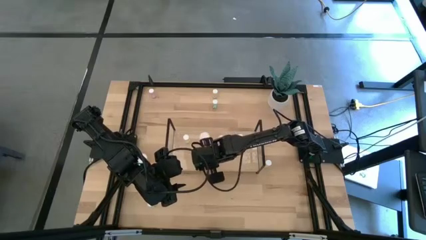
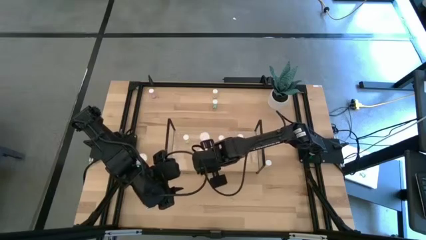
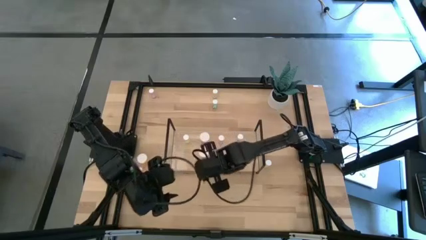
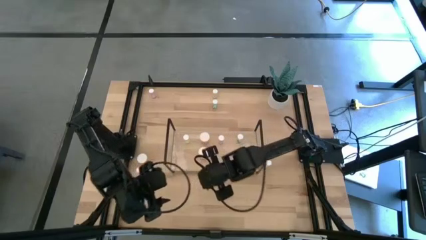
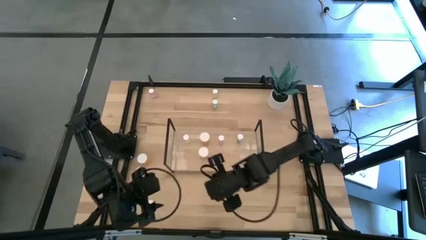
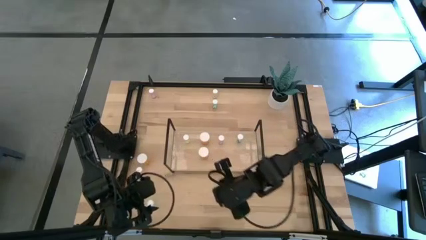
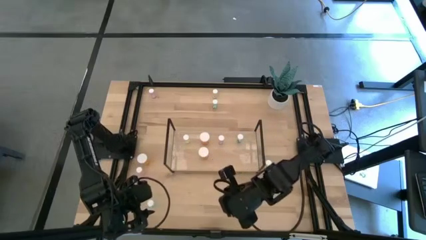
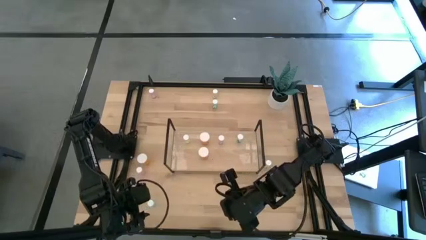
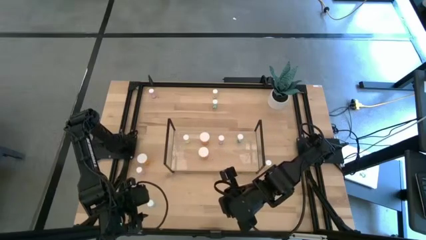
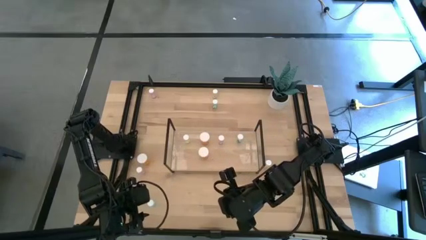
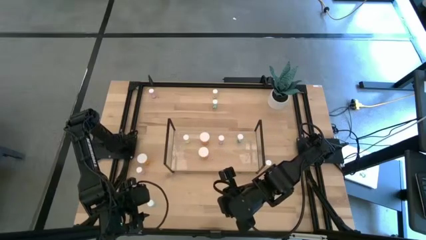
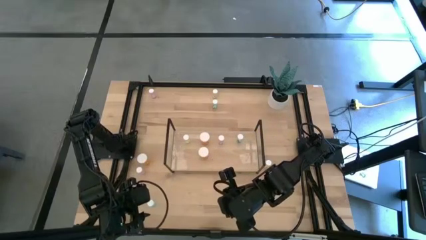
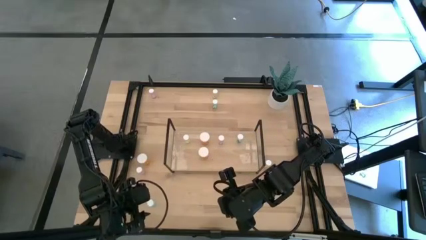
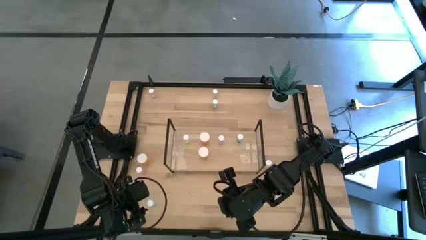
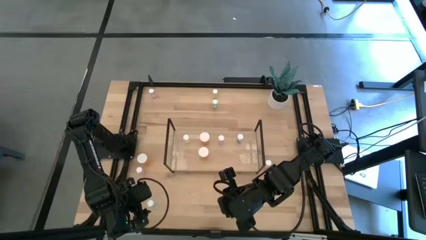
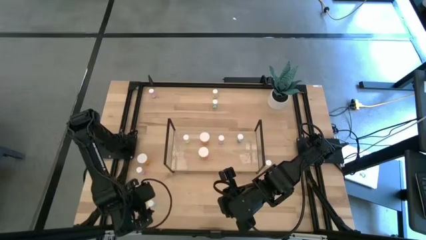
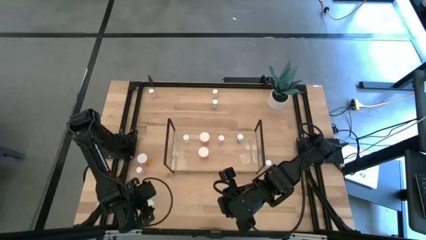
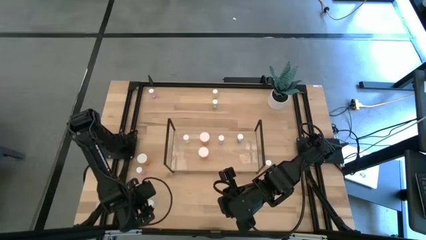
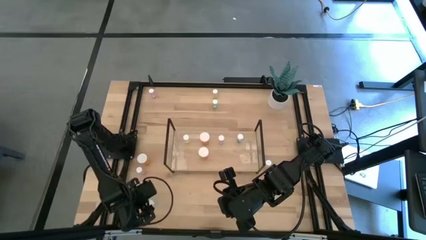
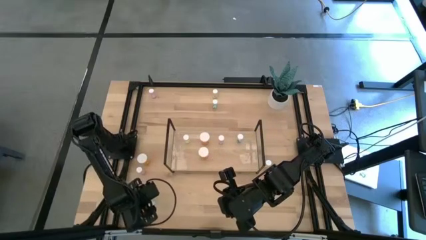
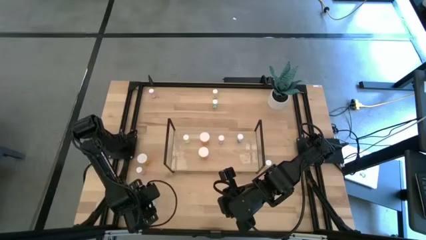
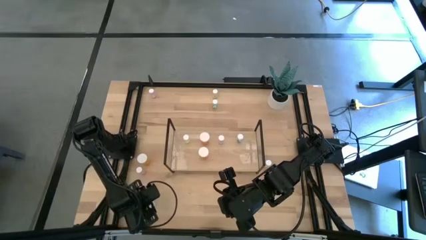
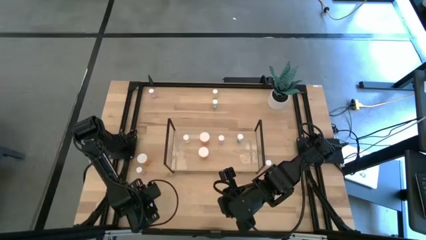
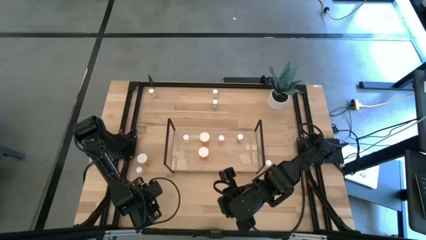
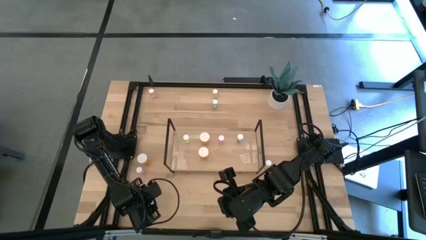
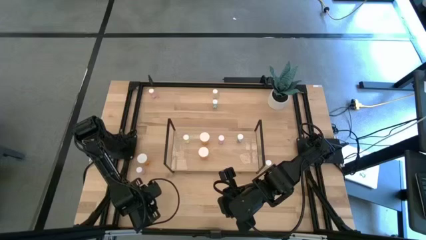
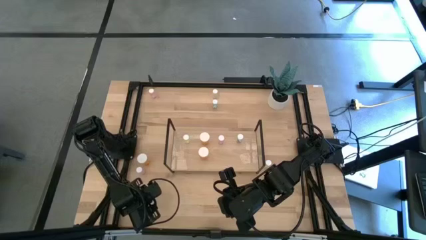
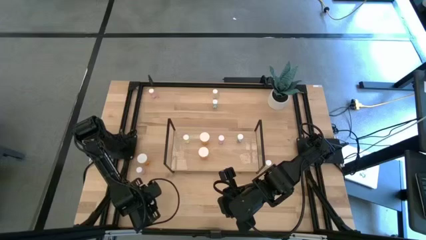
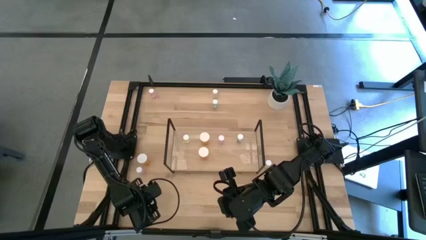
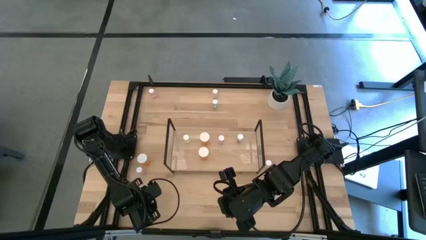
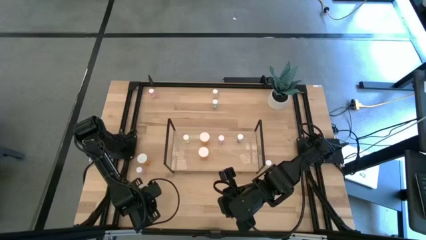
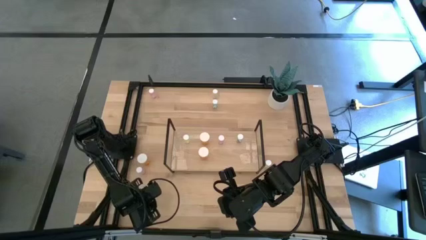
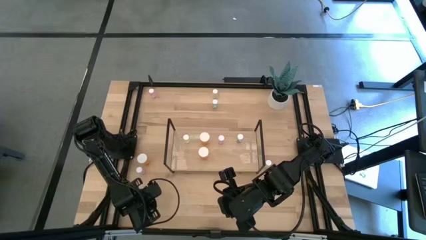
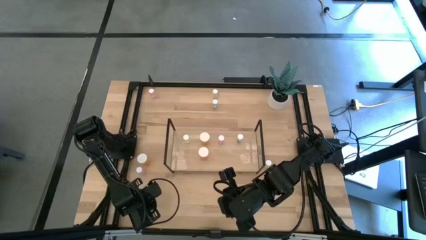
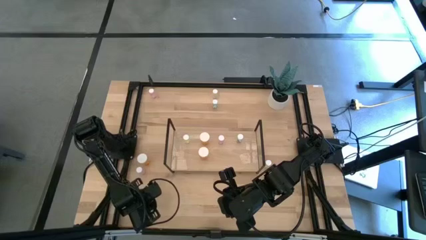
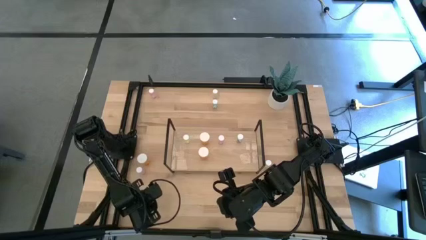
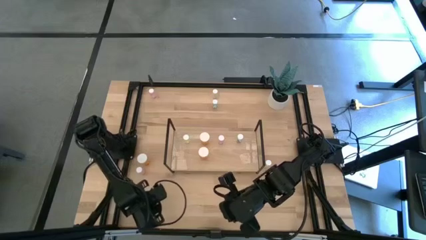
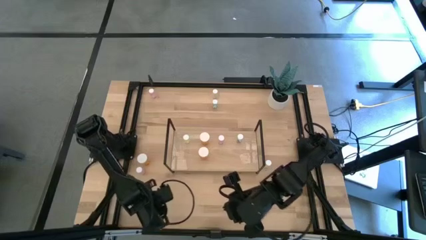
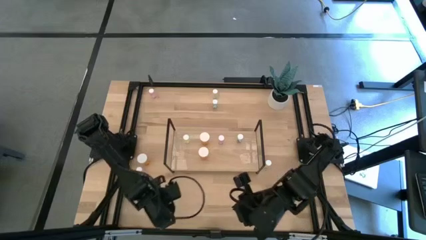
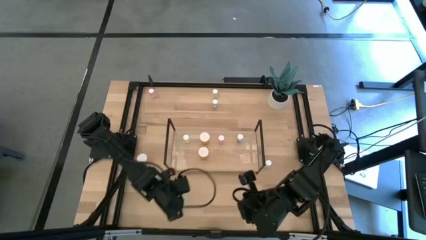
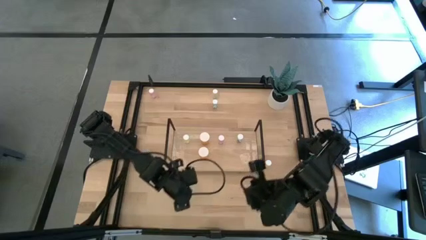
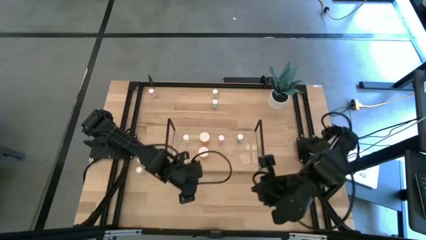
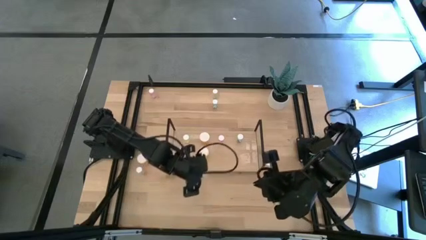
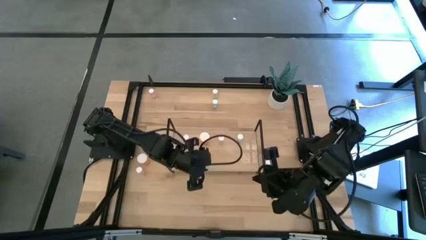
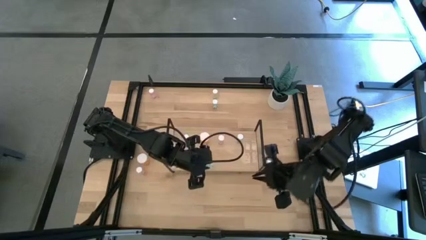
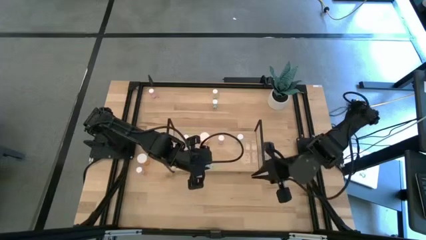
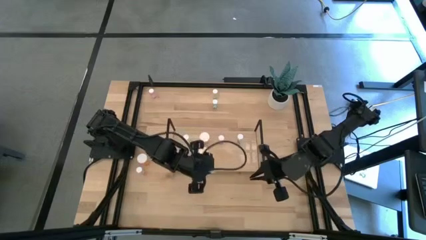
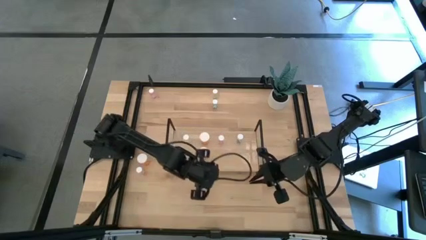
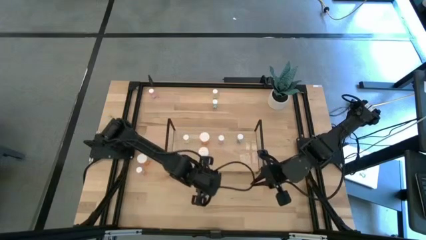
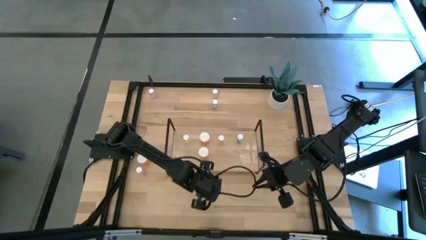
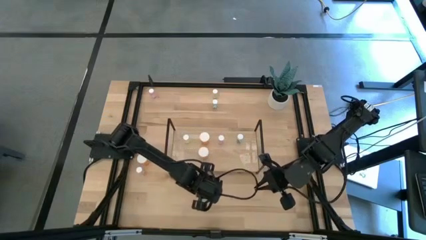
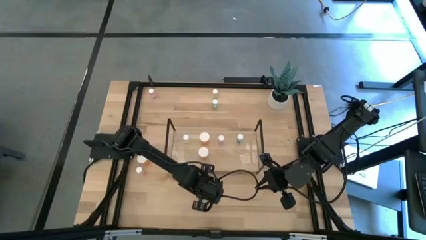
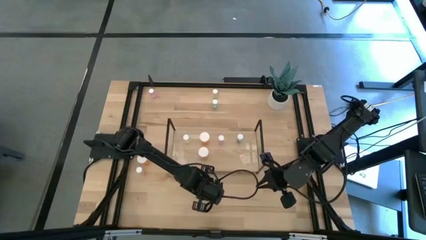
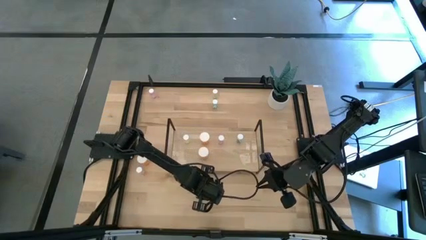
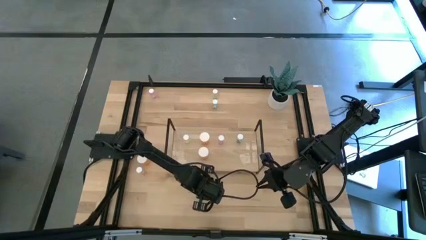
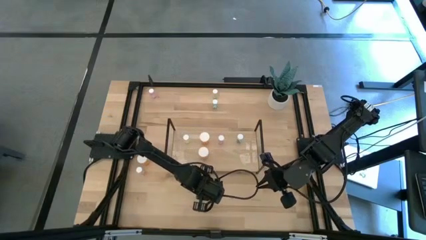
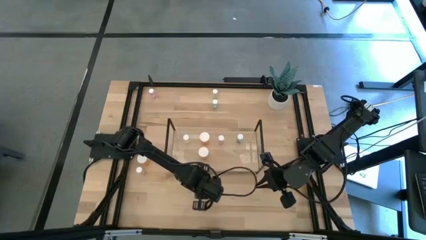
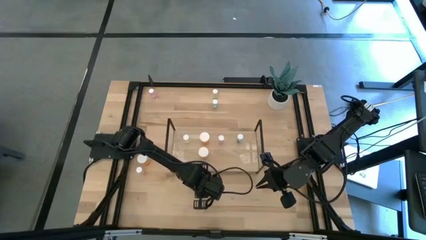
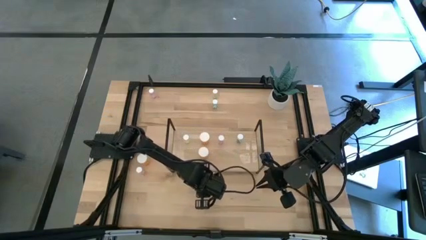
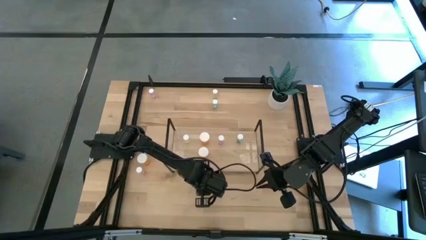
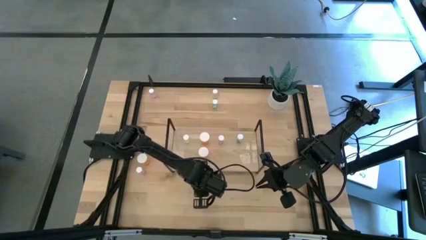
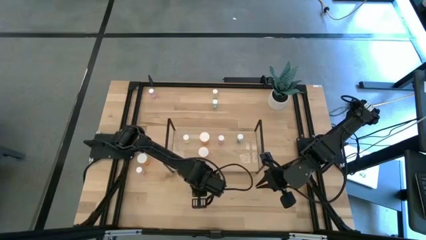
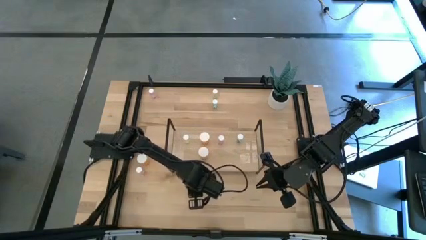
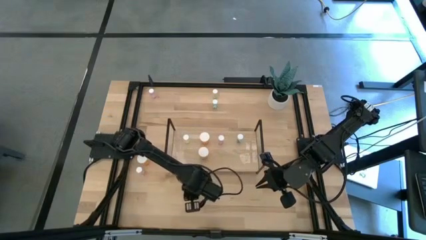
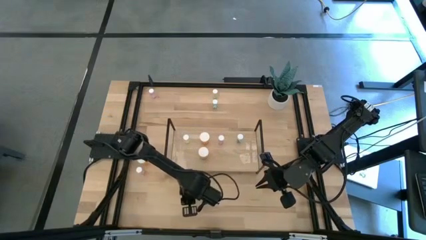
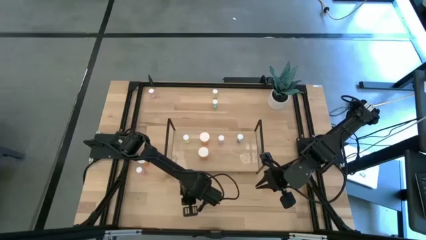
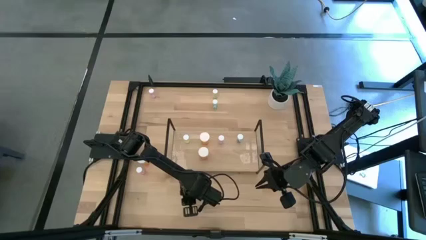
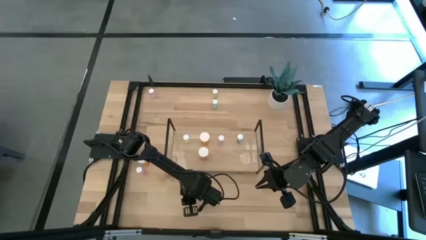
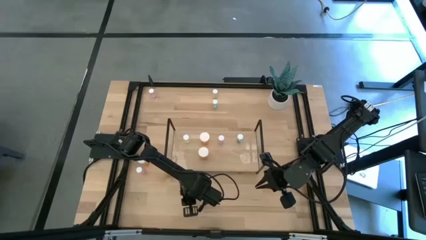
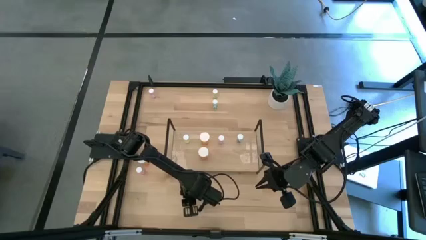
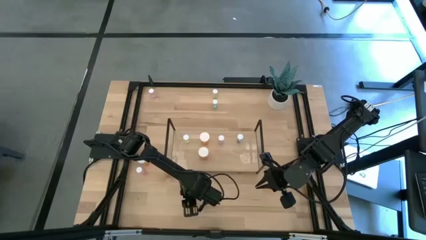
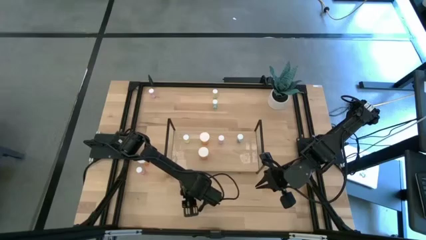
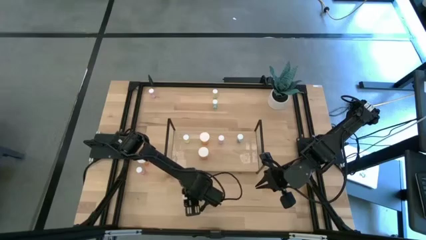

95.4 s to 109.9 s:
Task: Pick and place medicine bottles onto shelf by color
Put the bottom blue pill bottle aligned with the blue pill bottle on the shelf

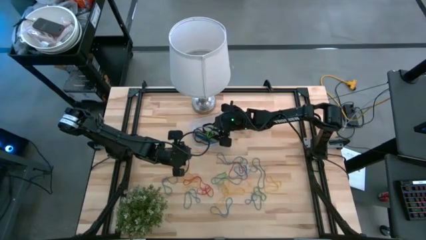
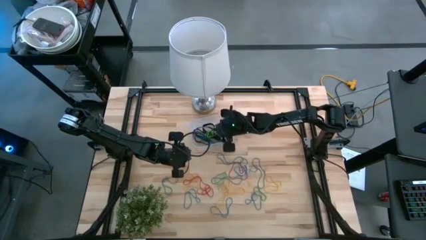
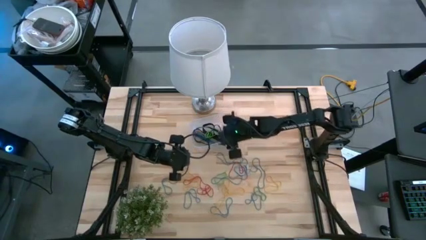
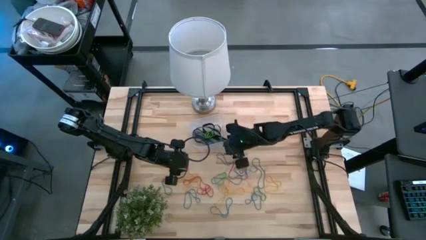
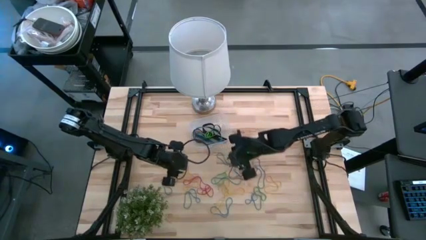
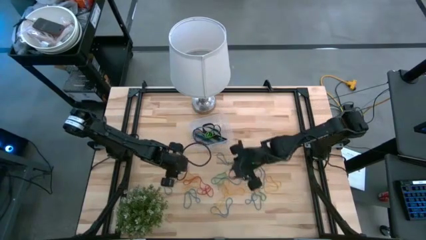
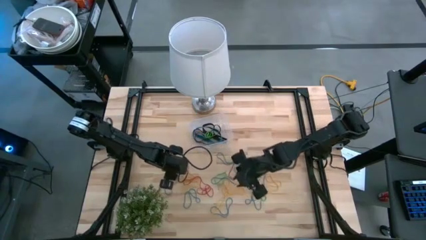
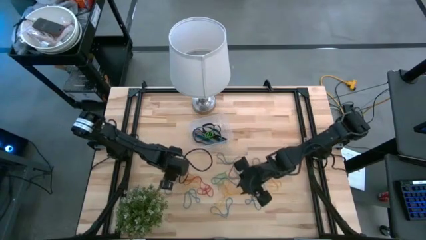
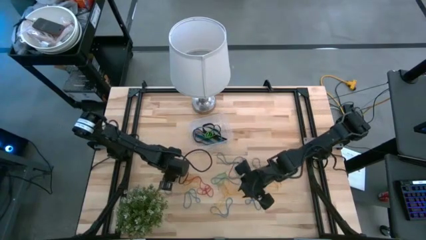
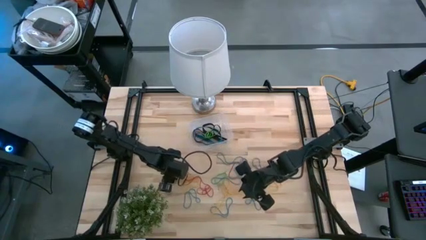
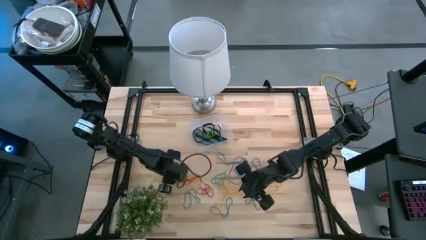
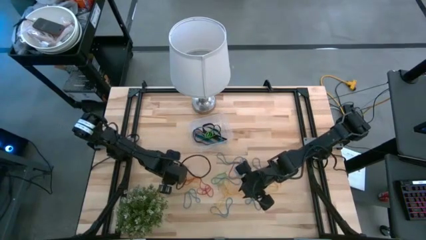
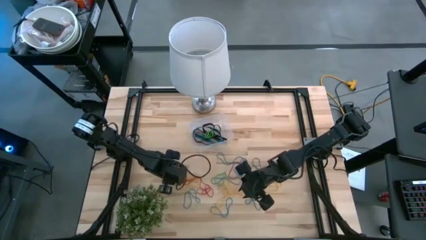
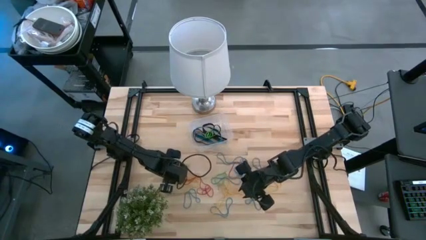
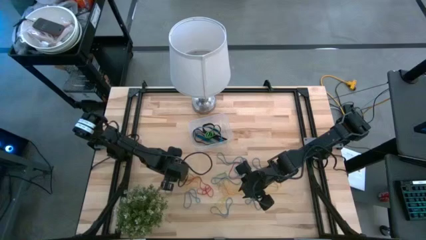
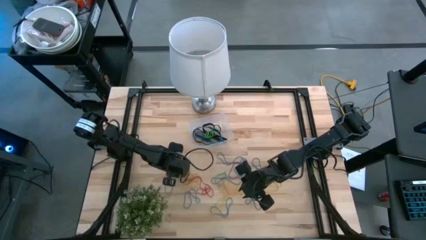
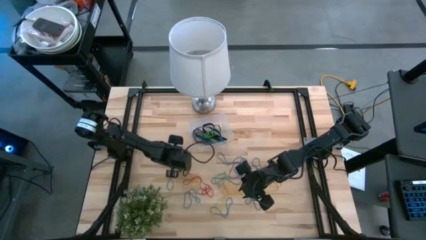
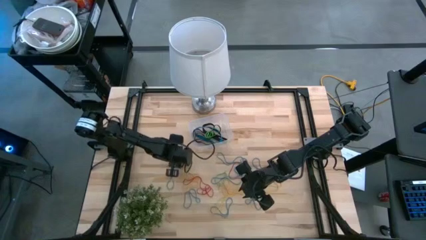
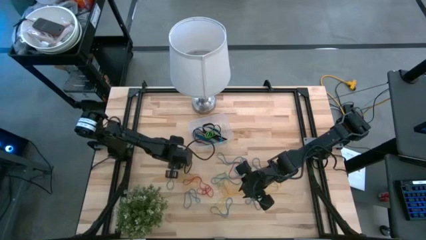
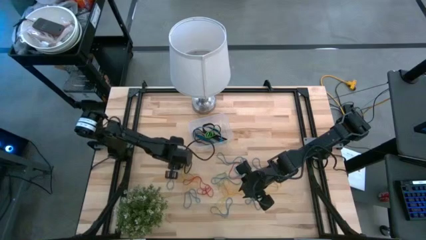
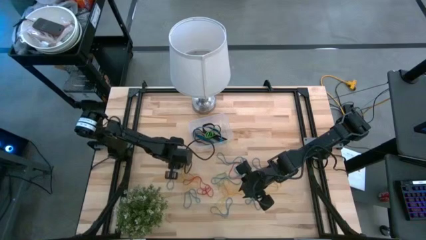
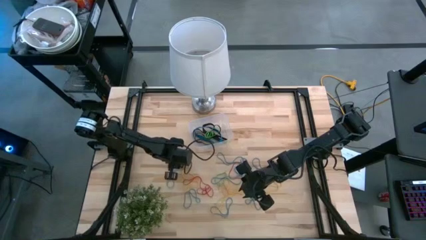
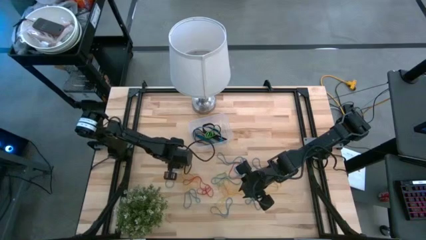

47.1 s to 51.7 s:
Task: Pick and place rubber bands into bin
Put the blue rubber band into the transparent container
